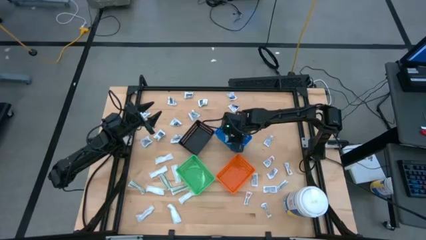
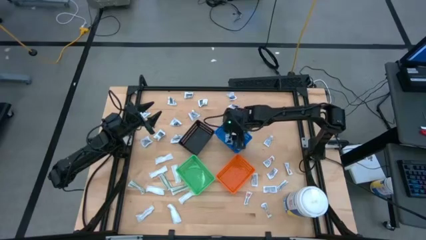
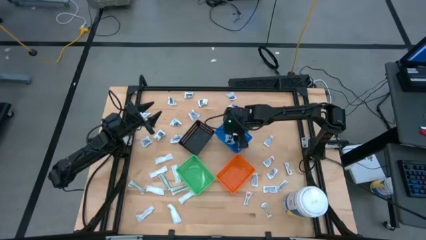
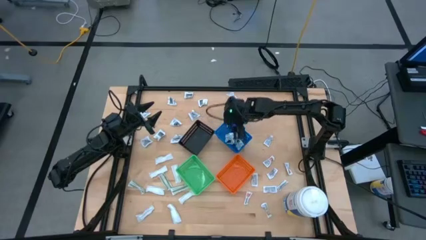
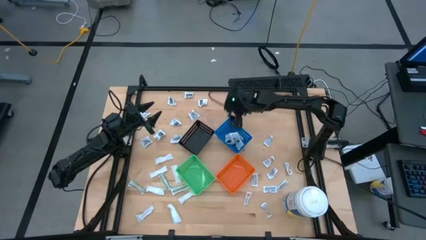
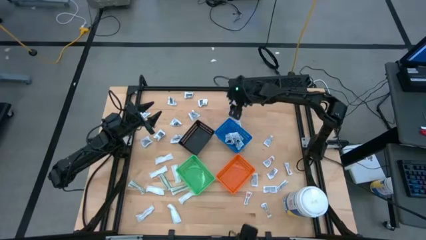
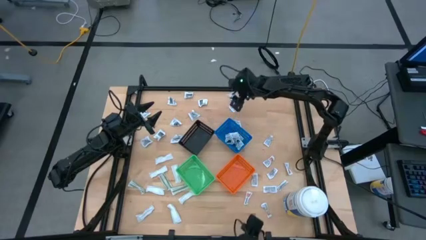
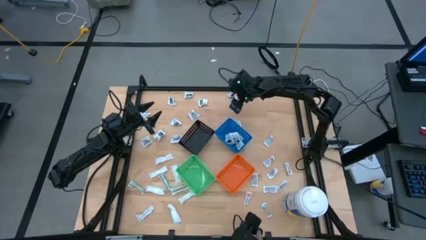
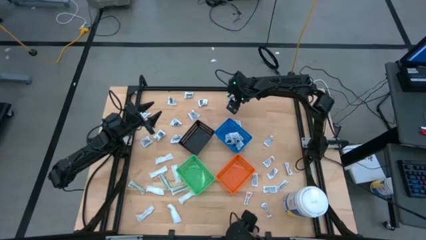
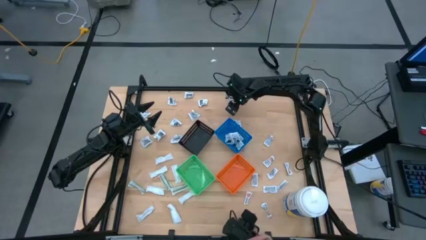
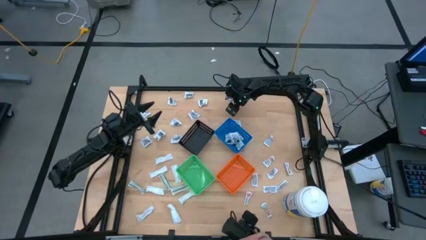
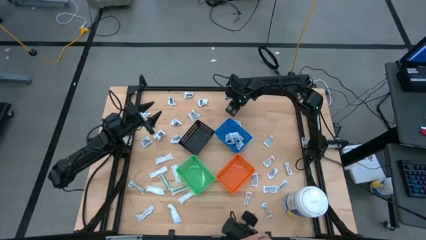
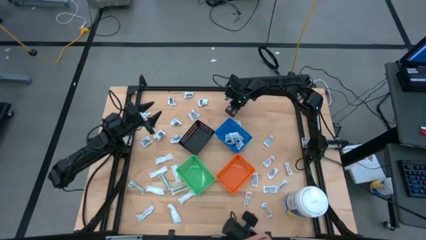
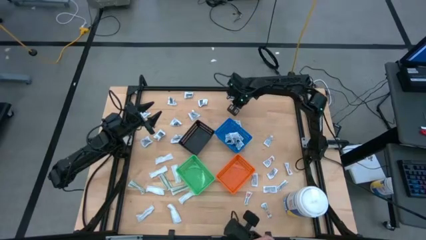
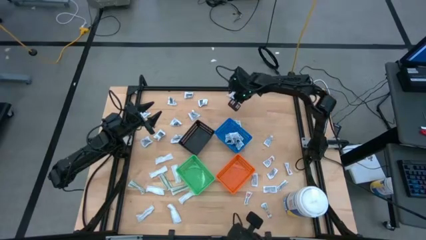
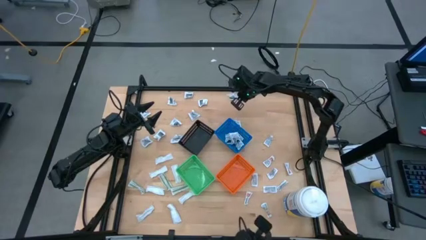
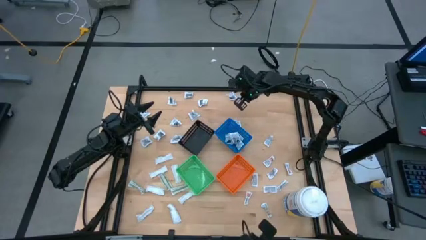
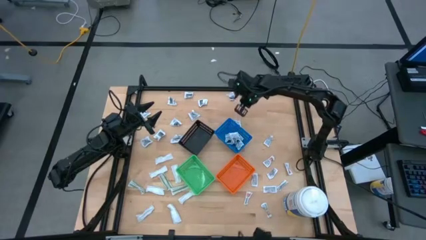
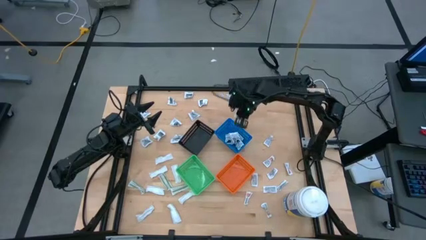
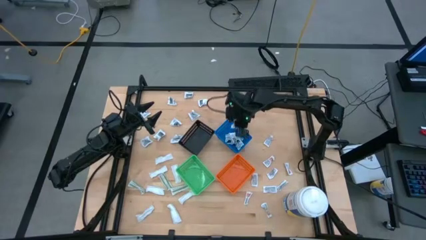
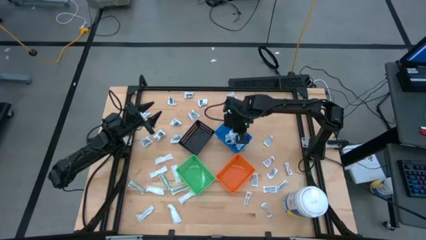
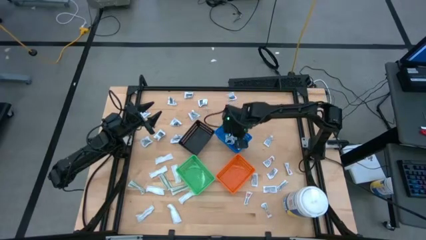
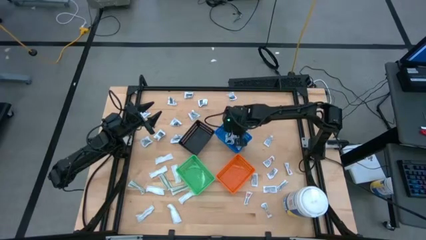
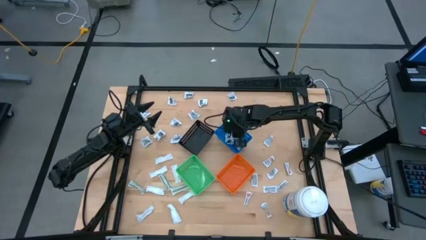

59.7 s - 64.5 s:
Task: Pick & Place First Aid Supplies
Put the blue alcohol pad into the blue bin

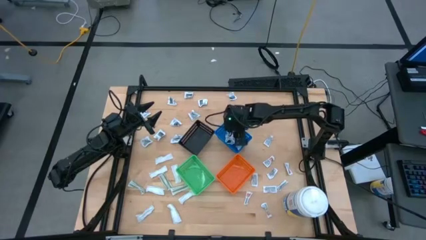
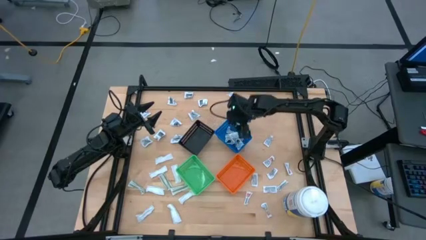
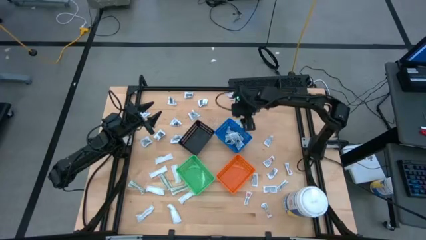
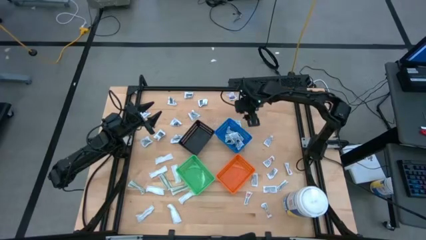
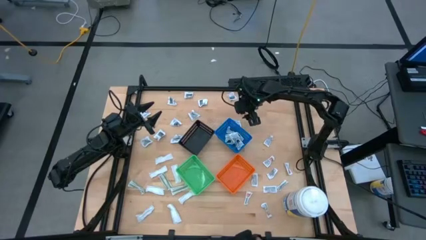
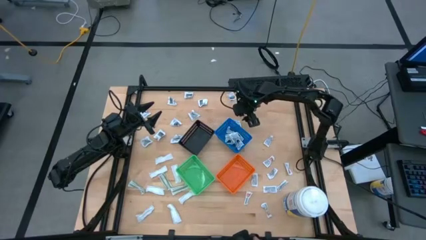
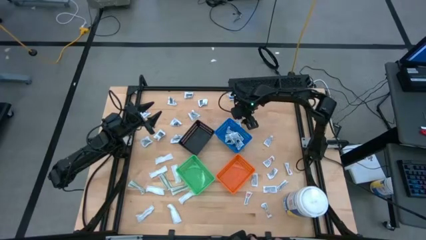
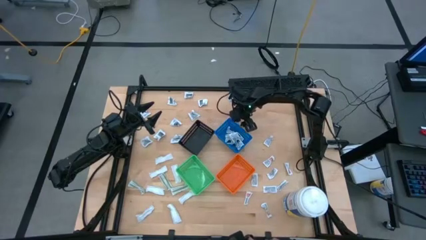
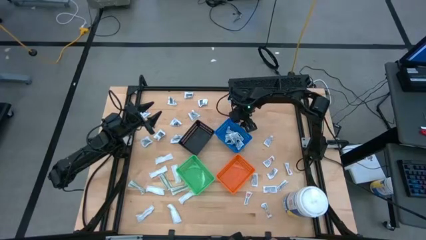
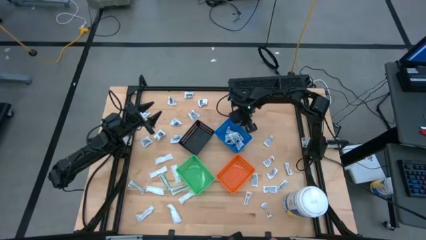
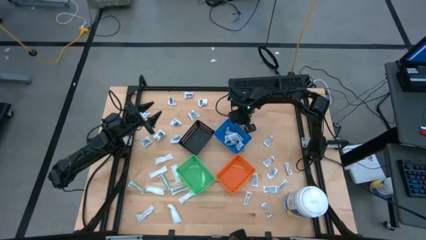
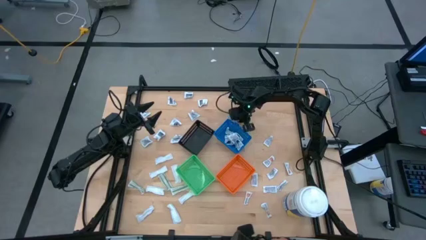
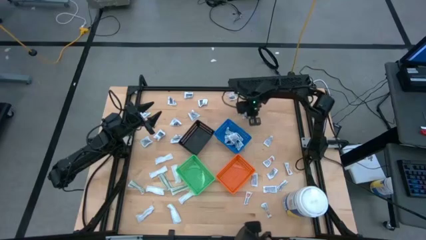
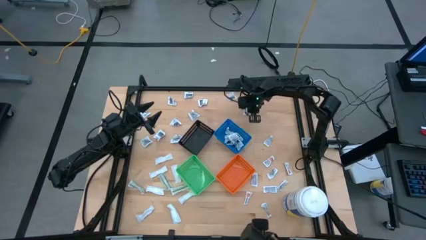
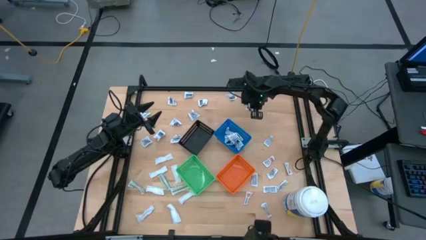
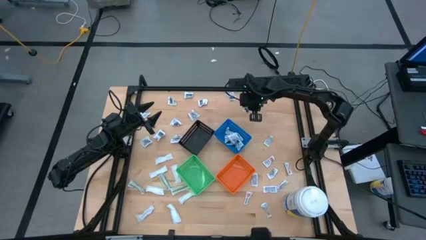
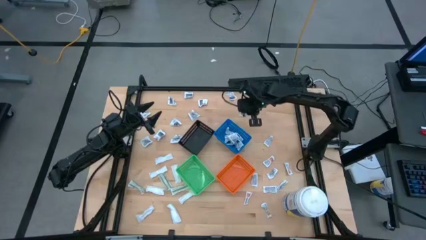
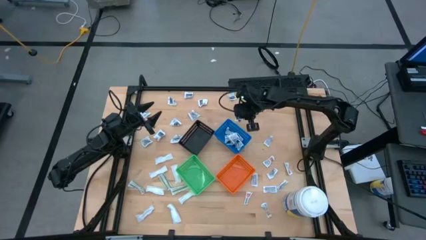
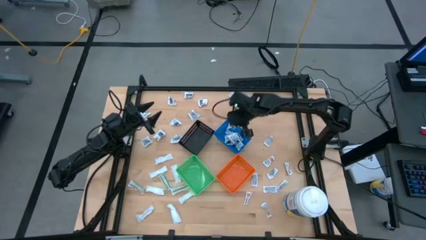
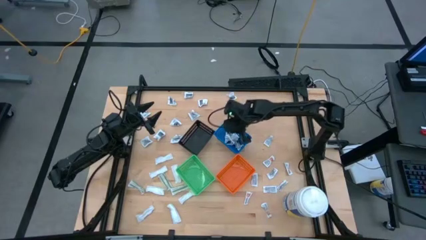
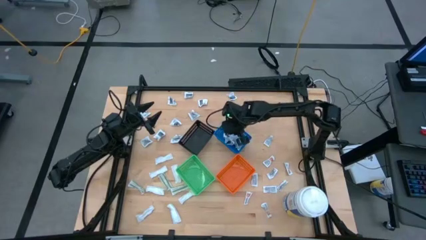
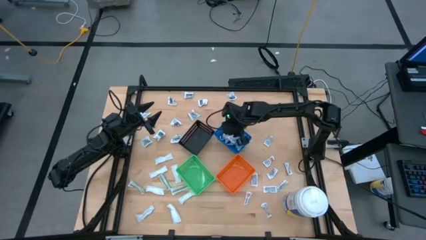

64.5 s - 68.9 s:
Put the blue alcohol pad into the blue bin

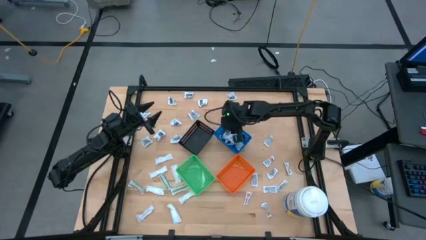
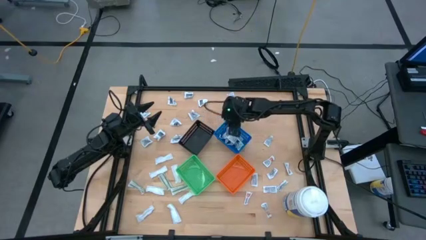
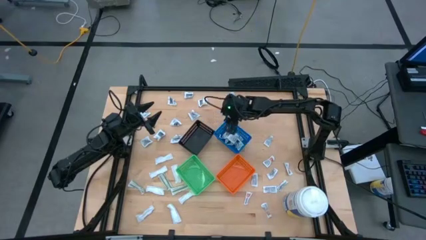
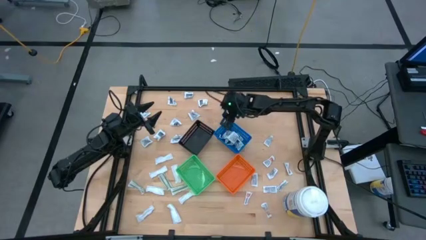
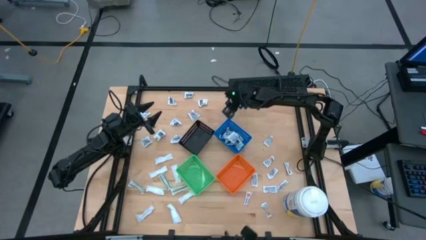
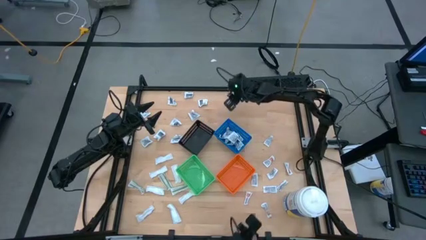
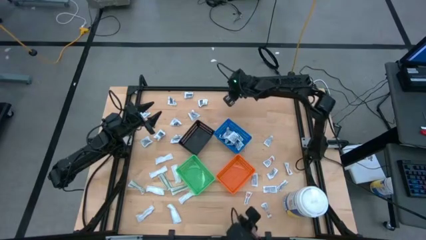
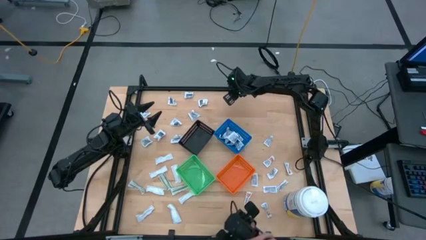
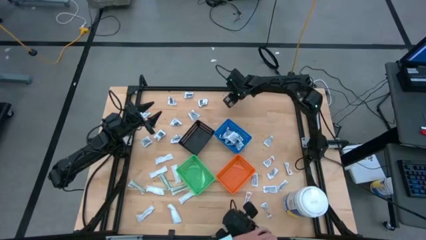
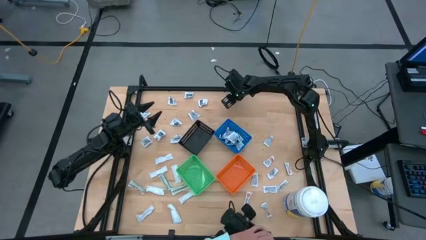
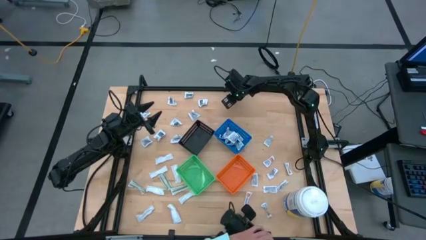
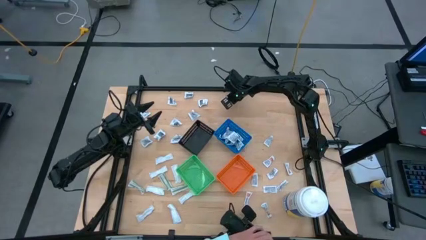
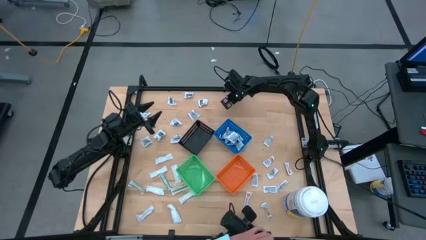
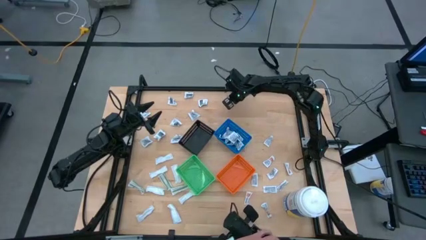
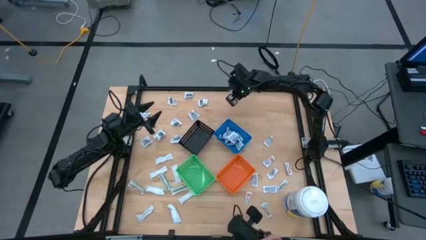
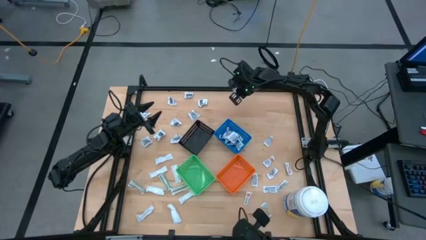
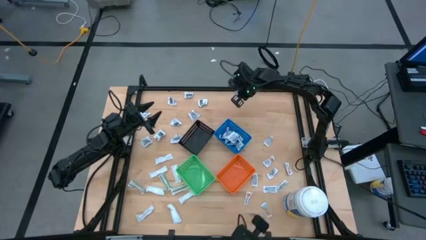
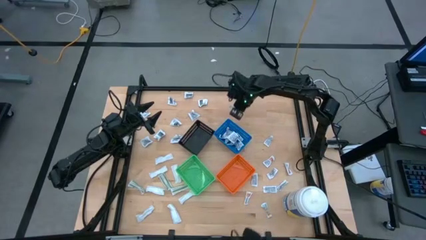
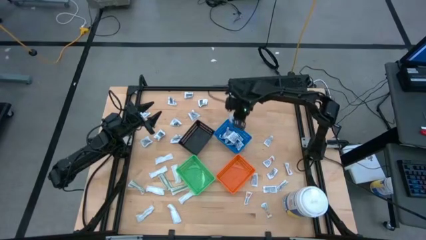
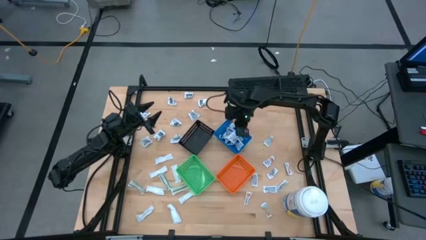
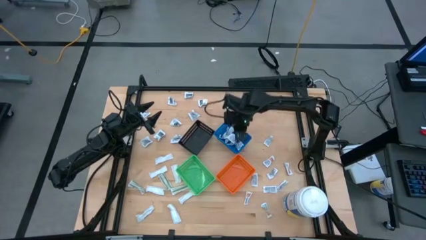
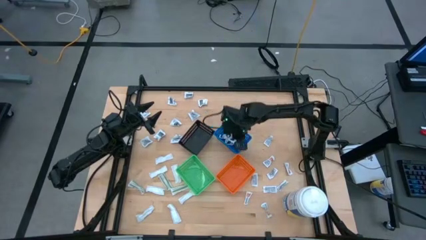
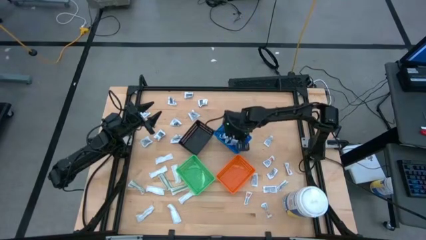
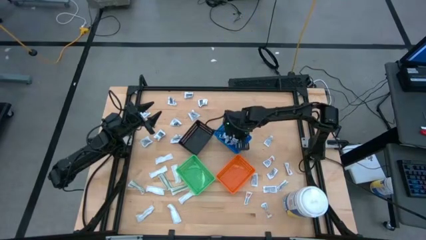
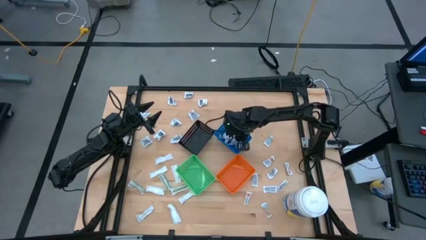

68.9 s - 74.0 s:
Put the blue alcohol pad into the blue bin

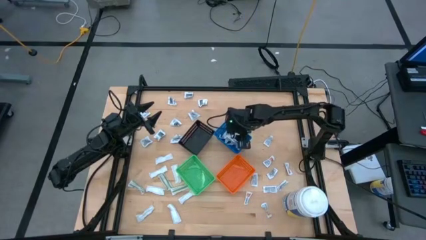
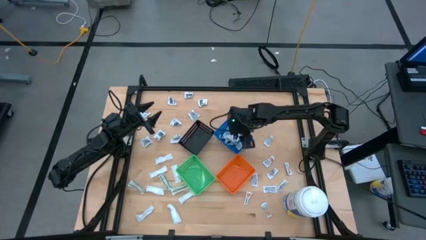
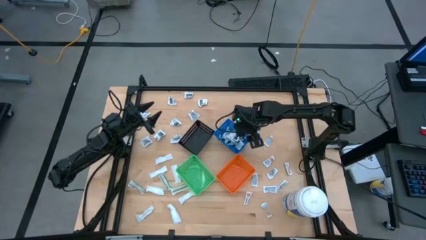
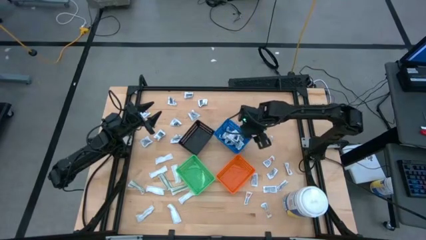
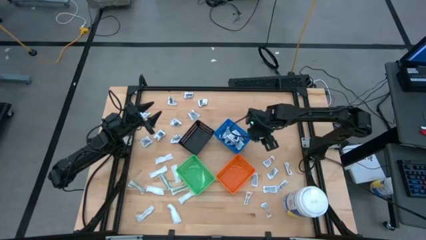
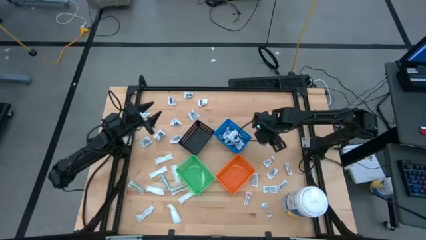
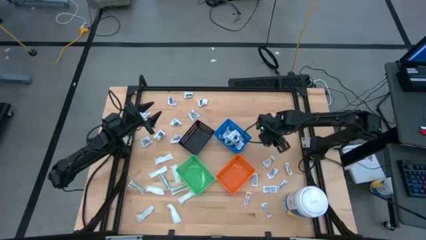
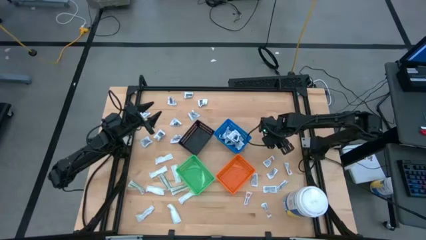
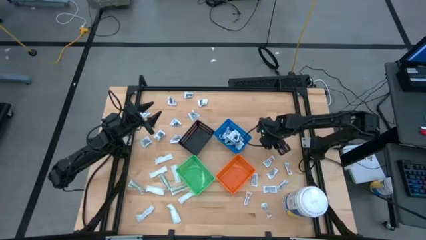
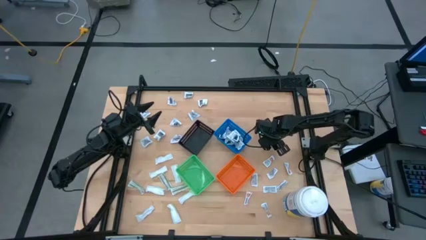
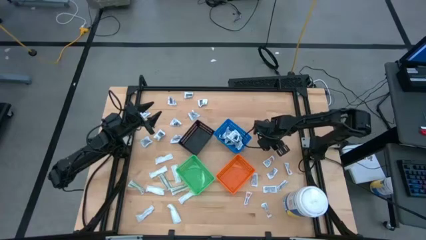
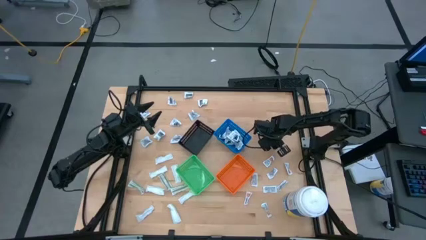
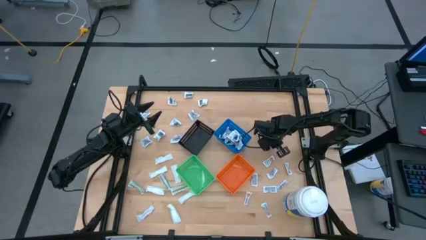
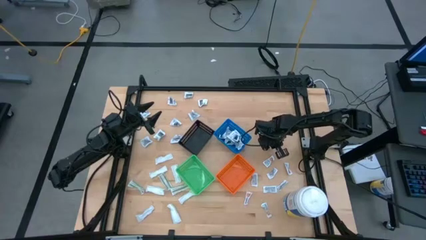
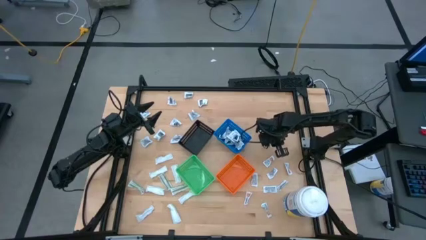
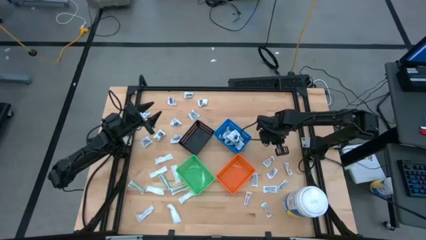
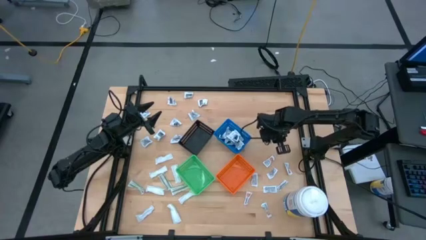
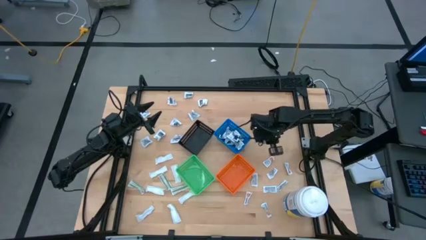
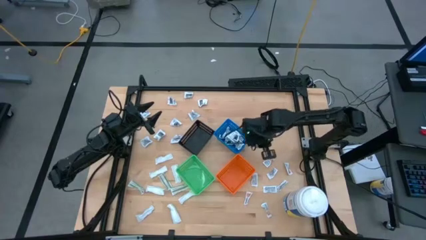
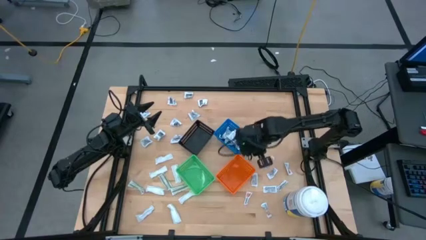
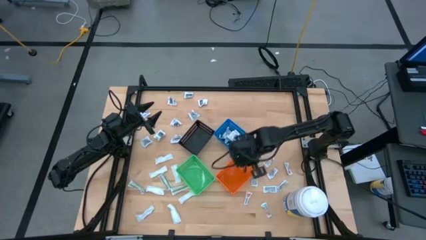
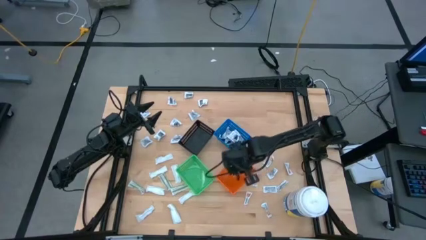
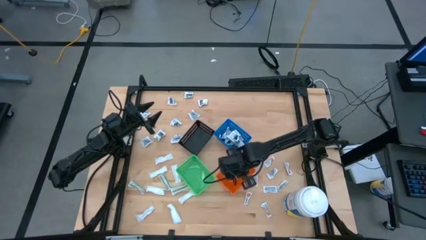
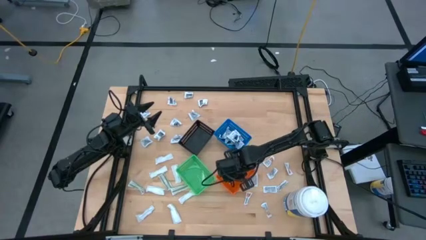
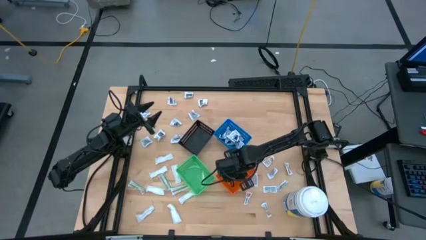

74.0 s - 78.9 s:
Put the orange ointment pack into the orange bin
